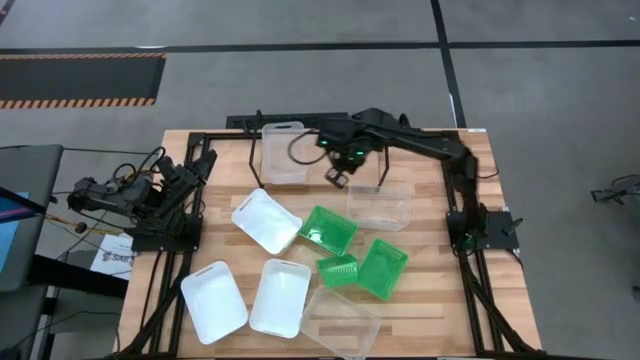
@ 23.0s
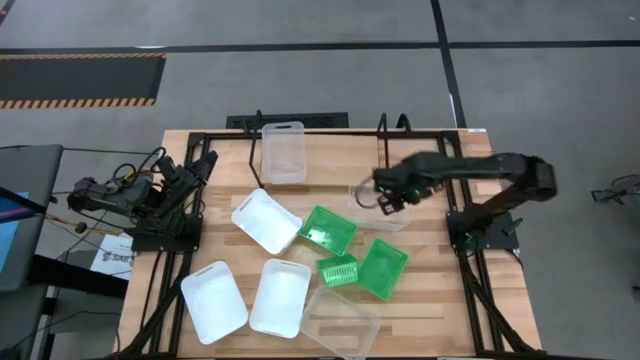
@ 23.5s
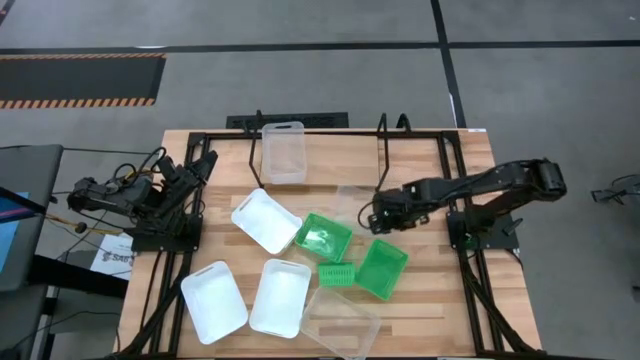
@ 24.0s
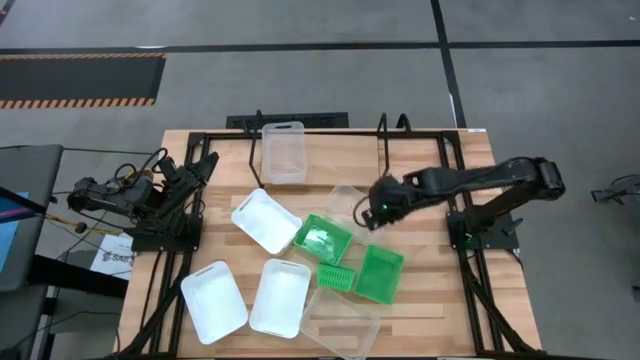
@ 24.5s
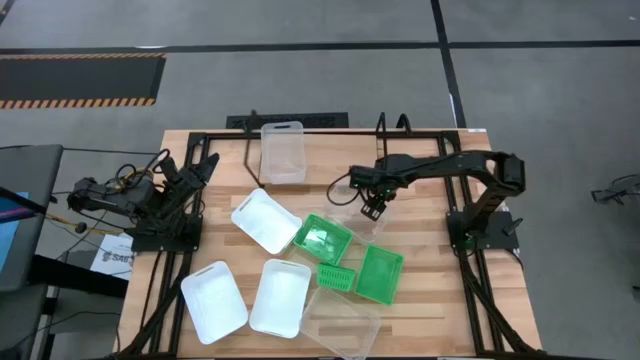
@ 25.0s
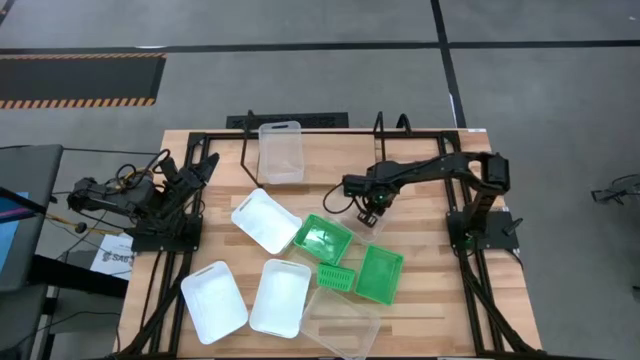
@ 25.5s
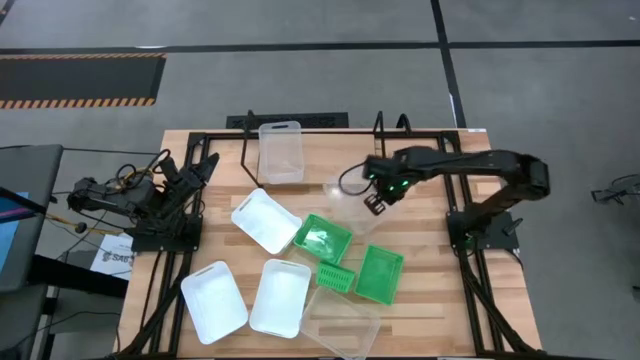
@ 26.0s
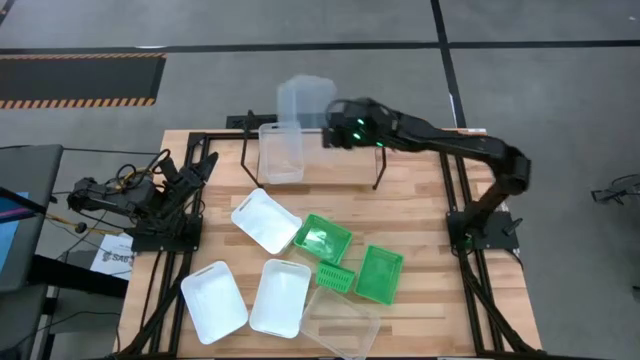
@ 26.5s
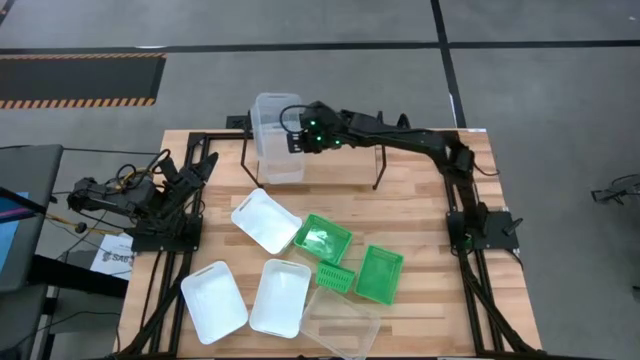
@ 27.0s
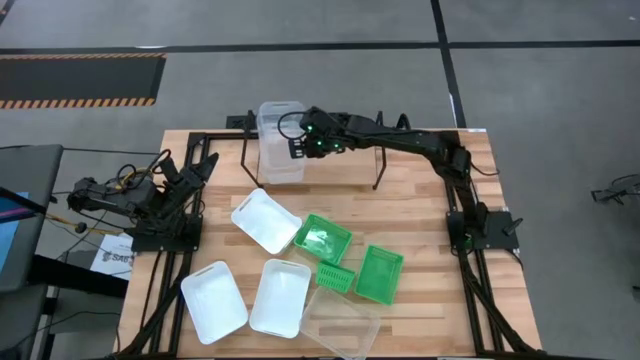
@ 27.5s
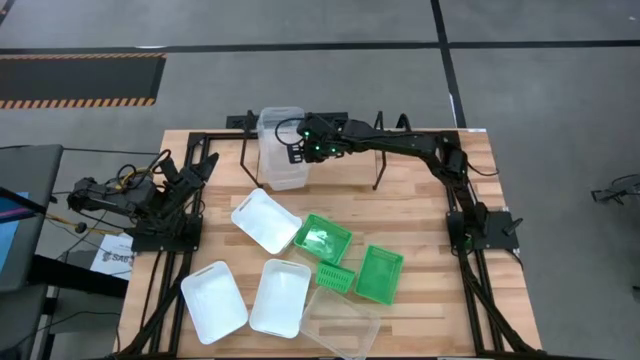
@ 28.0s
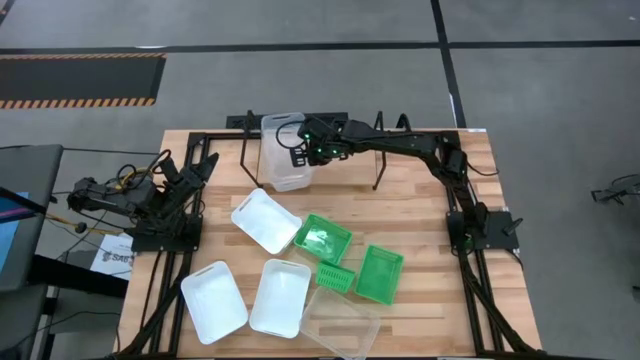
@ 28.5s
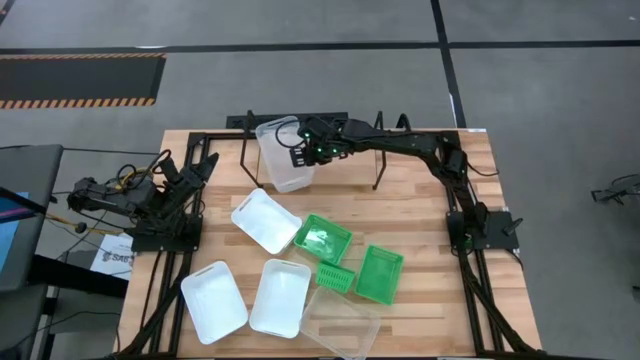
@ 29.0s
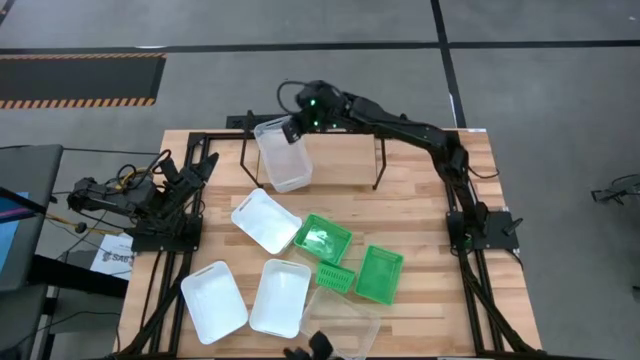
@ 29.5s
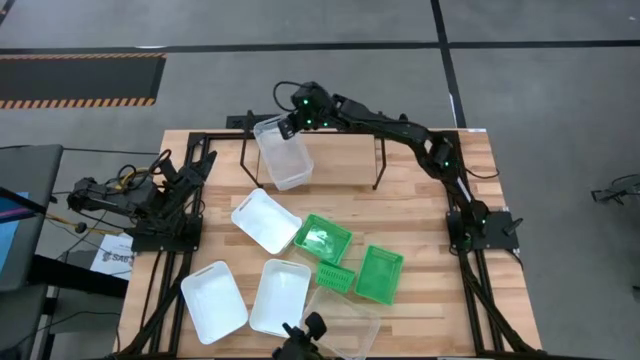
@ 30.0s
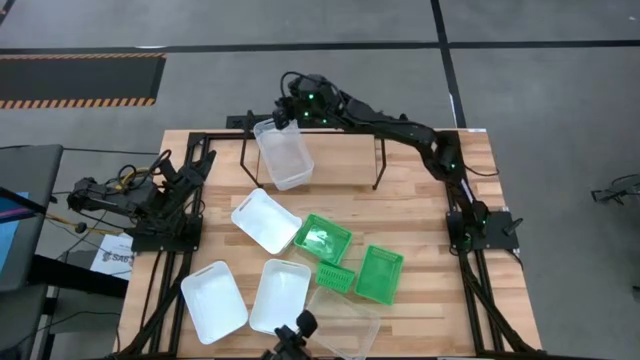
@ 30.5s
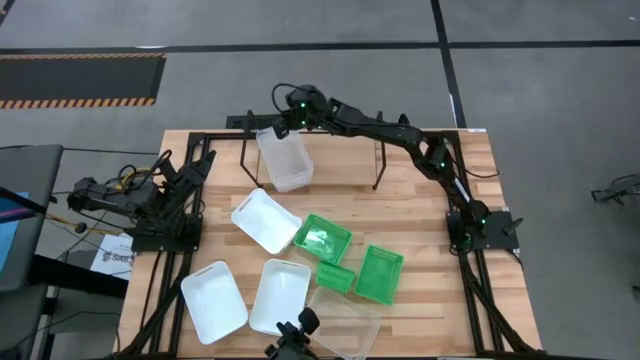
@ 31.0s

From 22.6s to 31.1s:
Task: Stack baskets on shelf by color
Stack the top transparent bin on top of the transparent bin on the shelf

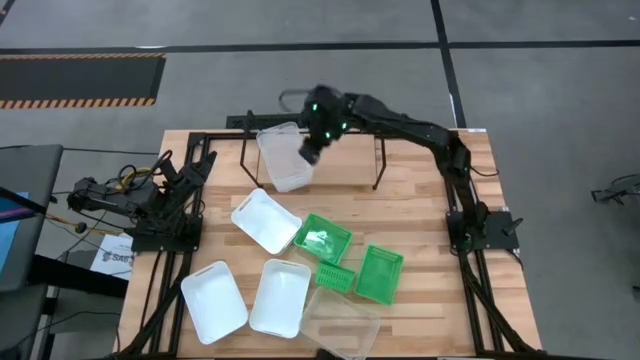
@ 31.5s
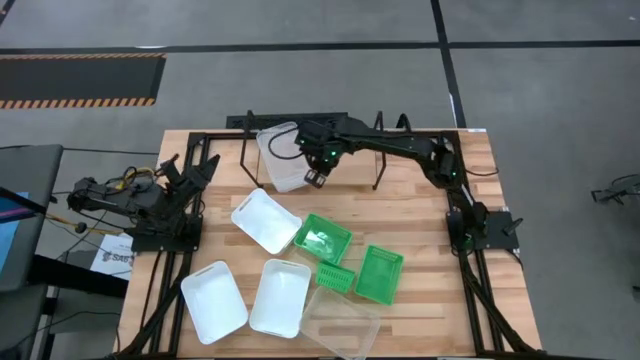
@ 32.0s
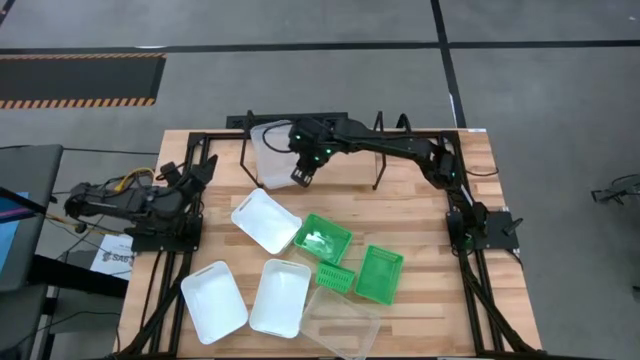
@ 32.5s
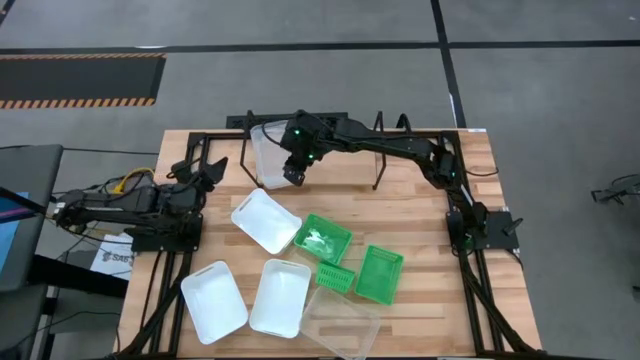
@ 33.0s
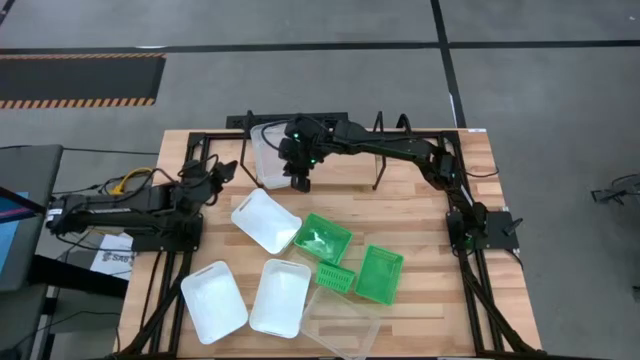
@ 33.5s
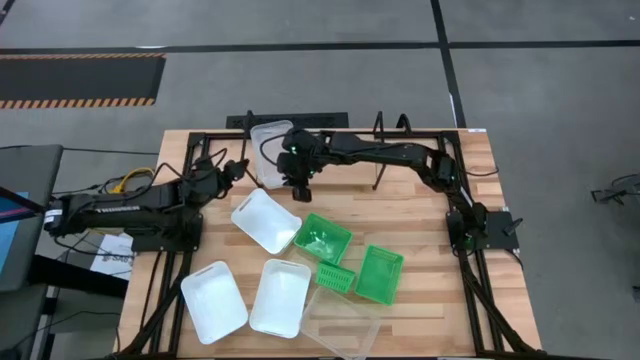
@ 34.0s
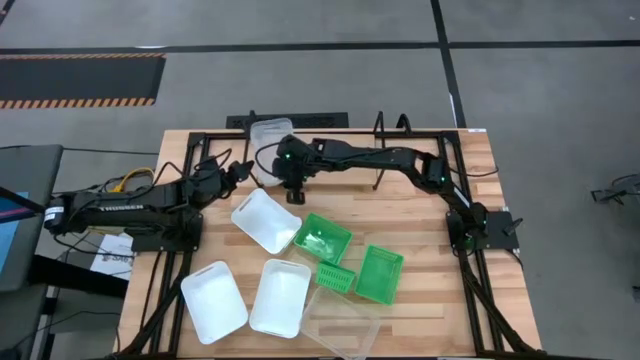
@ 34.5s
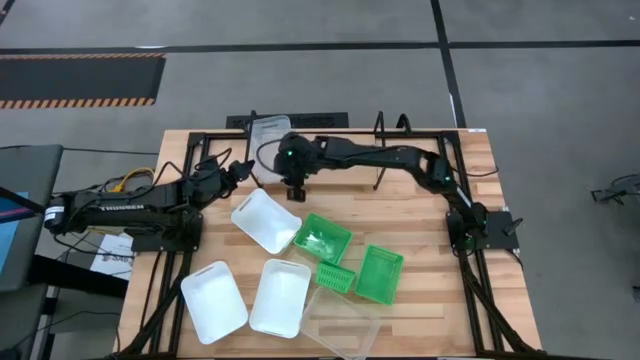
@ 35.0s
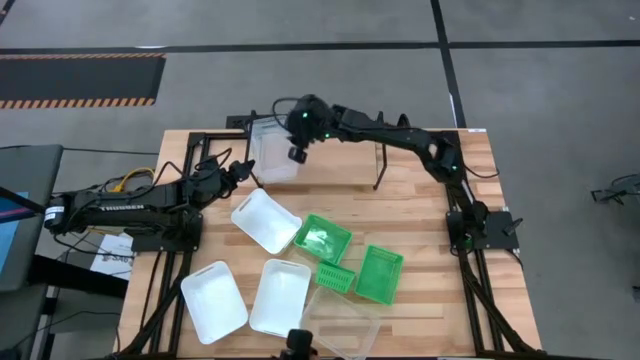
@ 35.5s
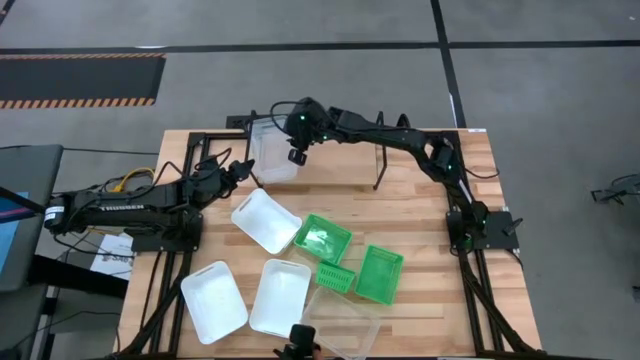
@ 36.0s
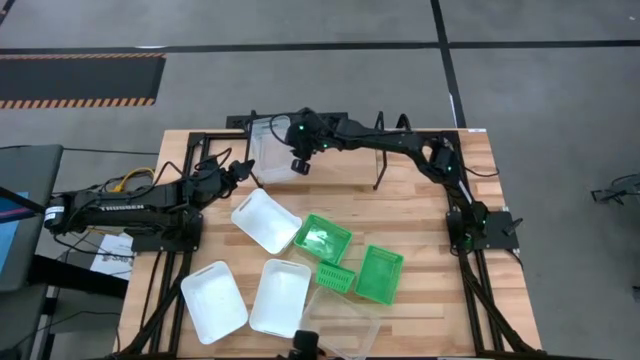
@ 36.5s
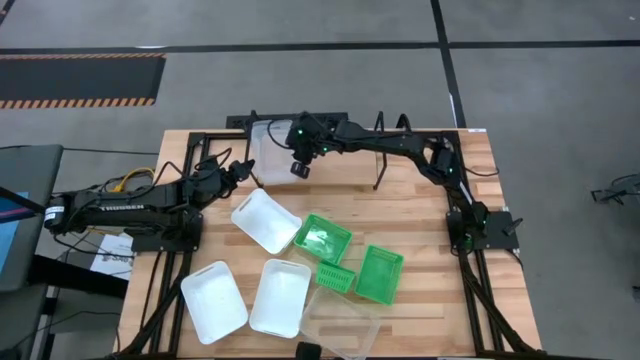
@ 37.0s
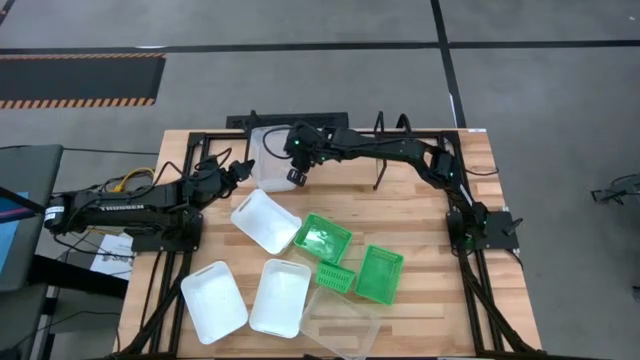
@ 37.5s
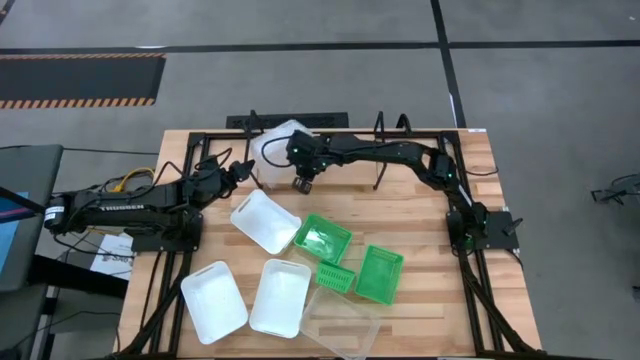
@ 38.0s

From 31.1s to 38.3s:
Adjust the transparent bins on the shelf

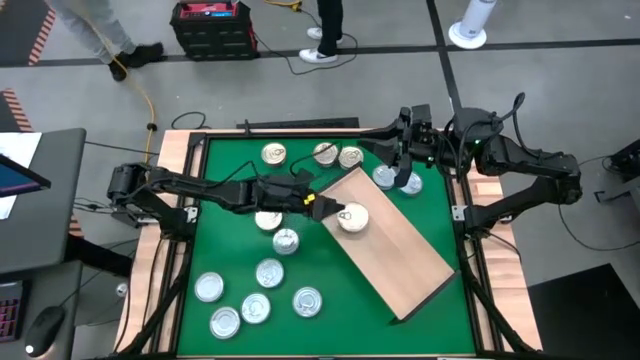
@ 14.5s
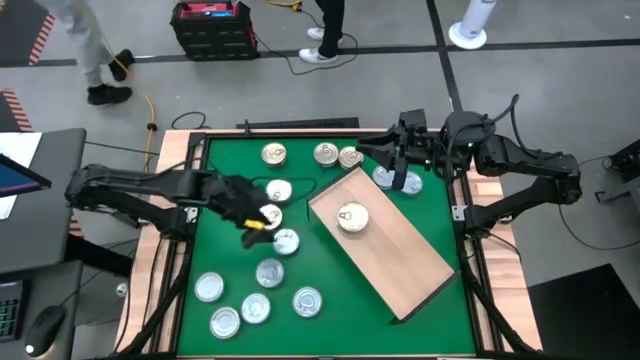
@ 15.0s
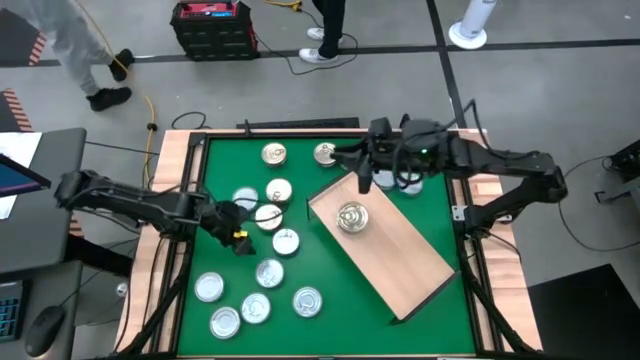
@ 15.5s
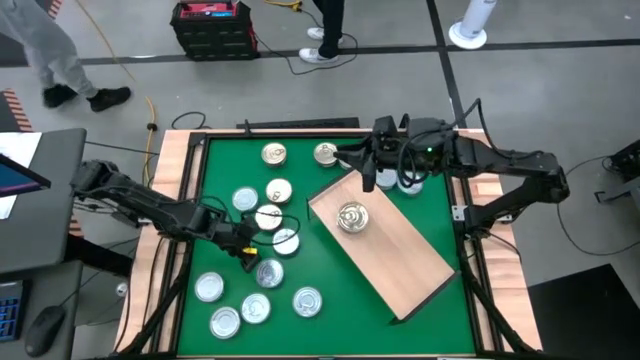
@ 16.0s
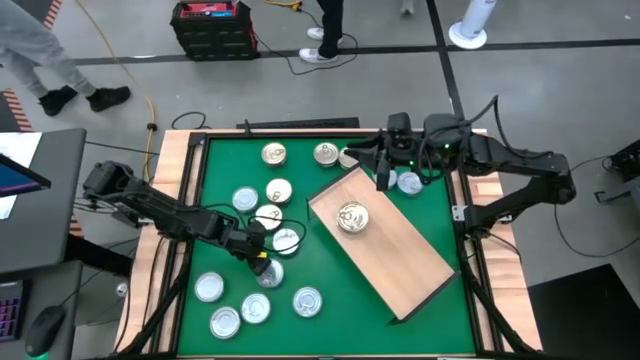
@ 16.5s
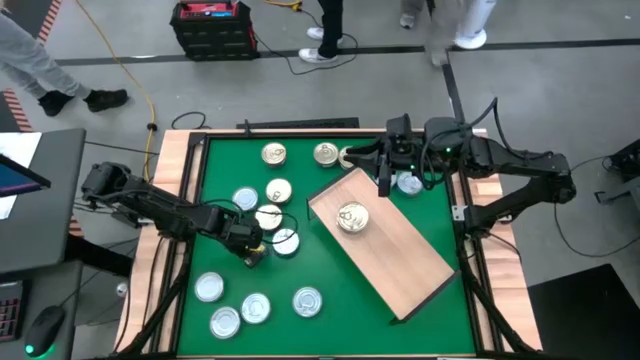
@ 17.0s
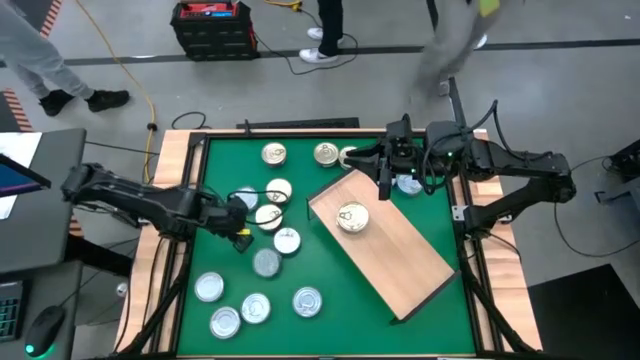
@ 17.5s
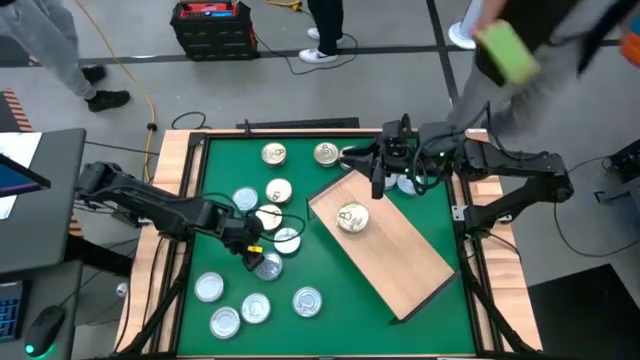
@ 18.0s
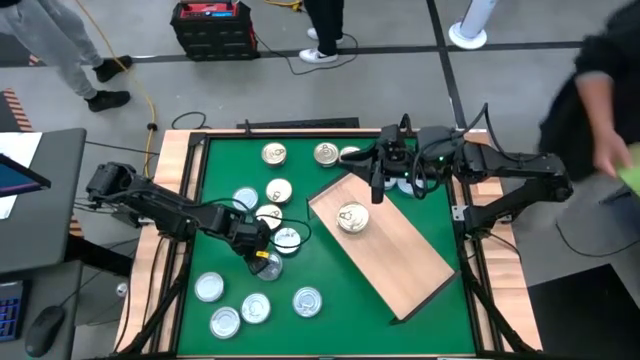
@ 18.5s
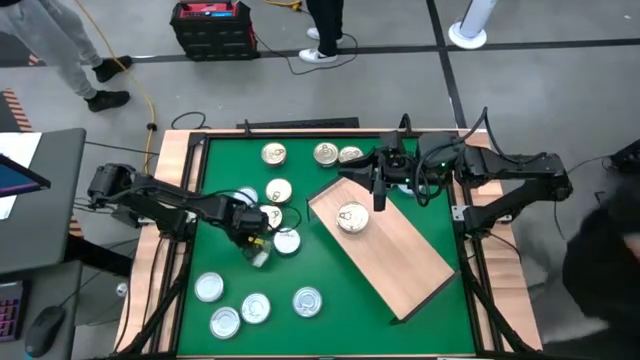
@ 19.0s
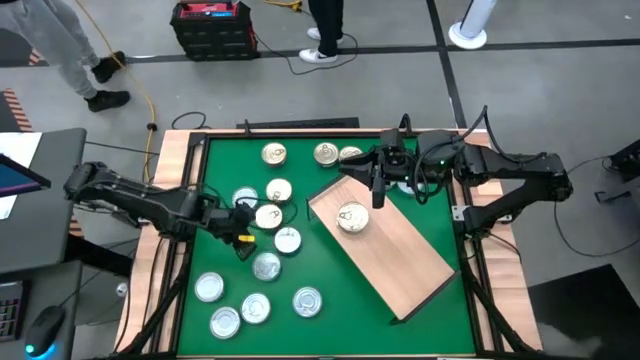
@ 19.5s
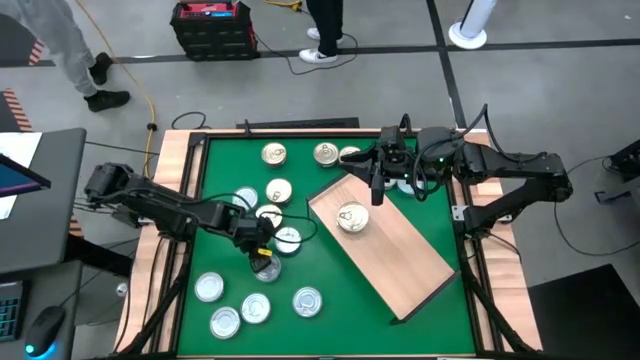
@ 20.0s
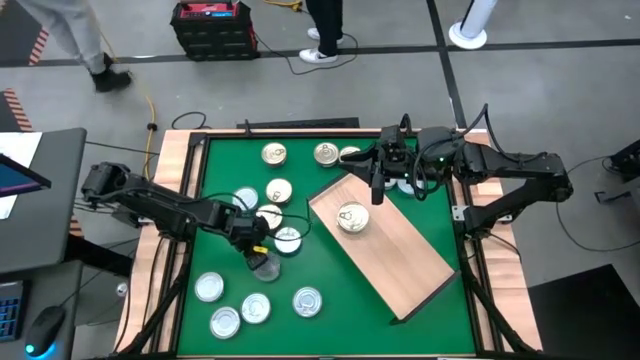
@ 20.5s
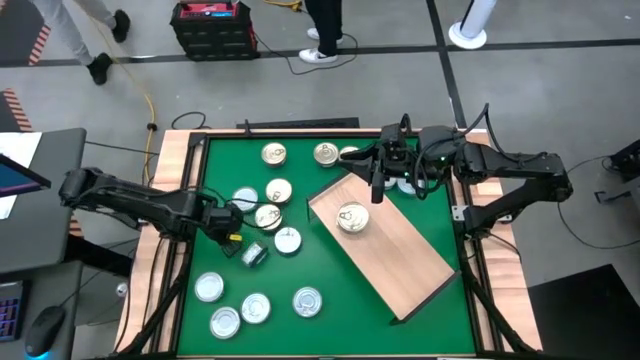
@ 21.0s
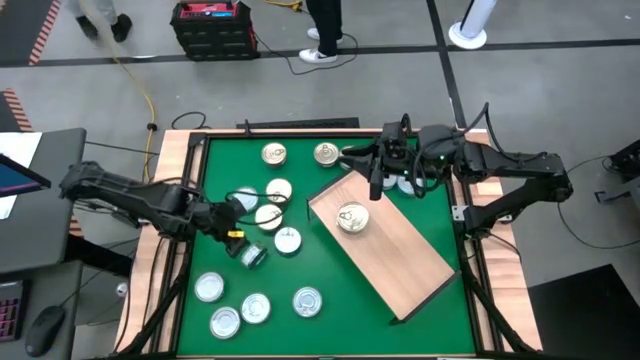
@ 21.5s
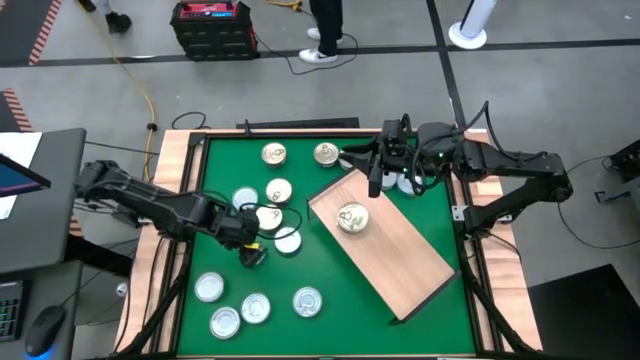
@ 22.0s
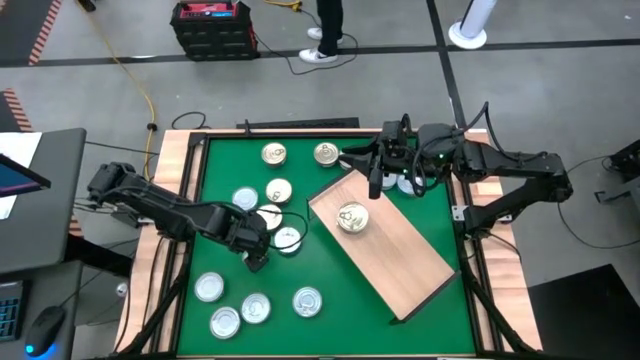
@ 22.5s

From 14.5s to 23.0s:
Task: Stack canned seafood by type on shelf
Put the green tuna can on the shelf
